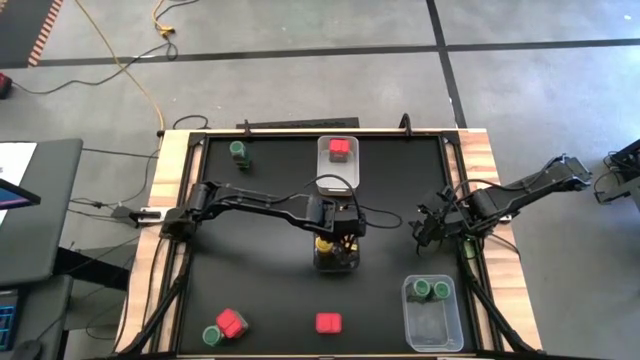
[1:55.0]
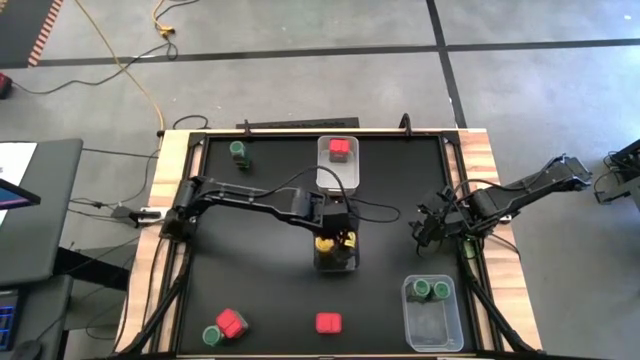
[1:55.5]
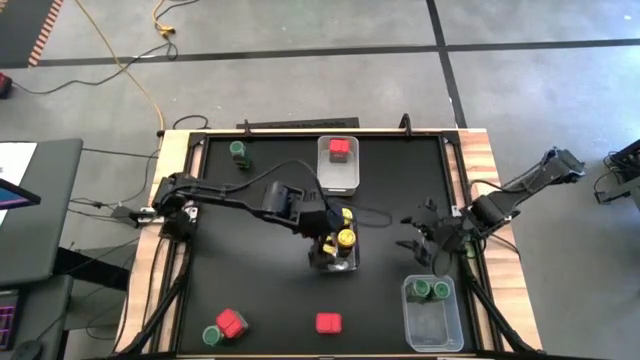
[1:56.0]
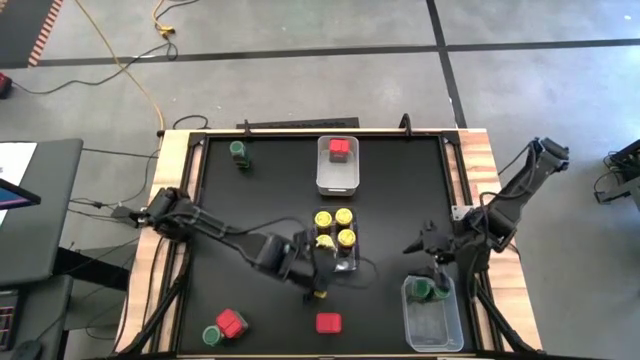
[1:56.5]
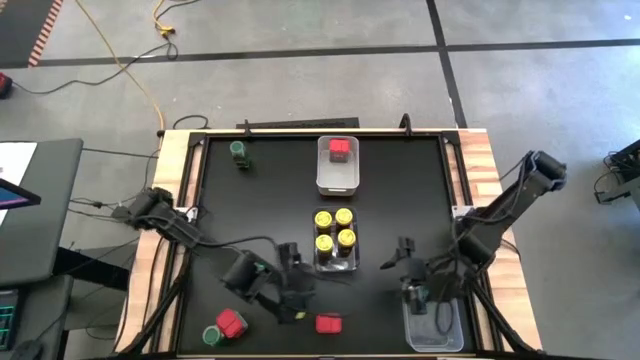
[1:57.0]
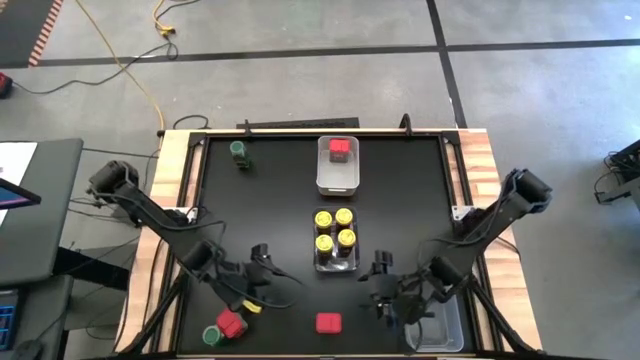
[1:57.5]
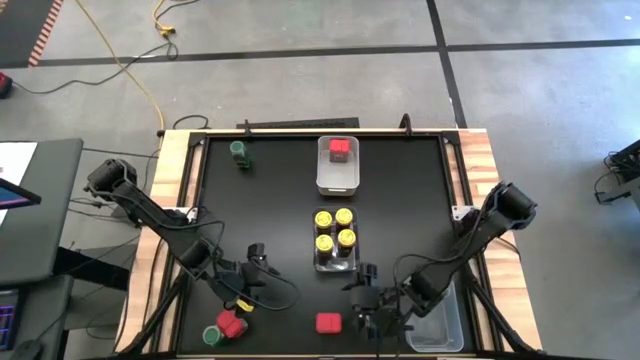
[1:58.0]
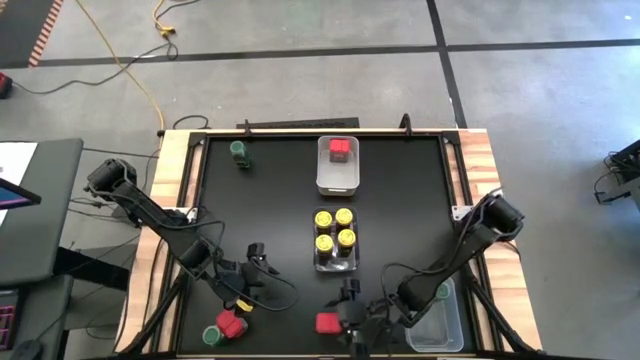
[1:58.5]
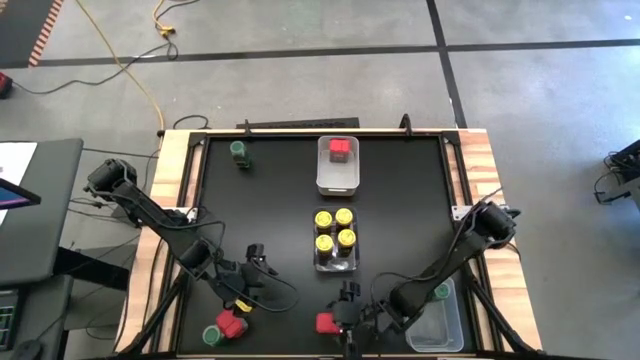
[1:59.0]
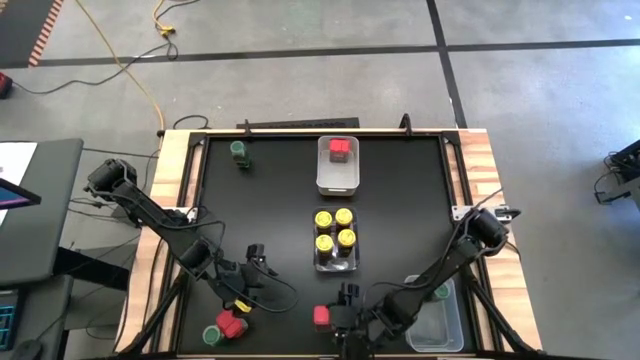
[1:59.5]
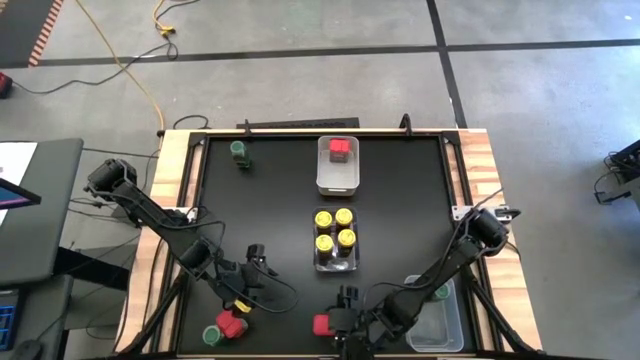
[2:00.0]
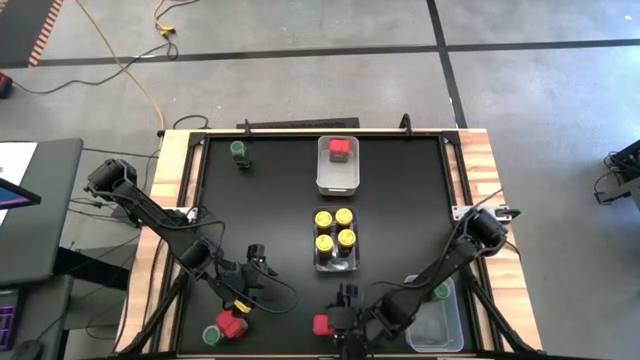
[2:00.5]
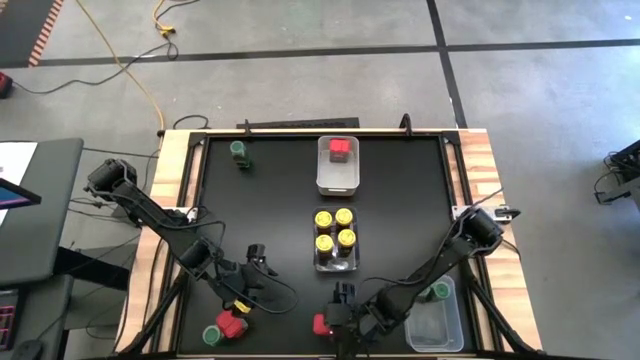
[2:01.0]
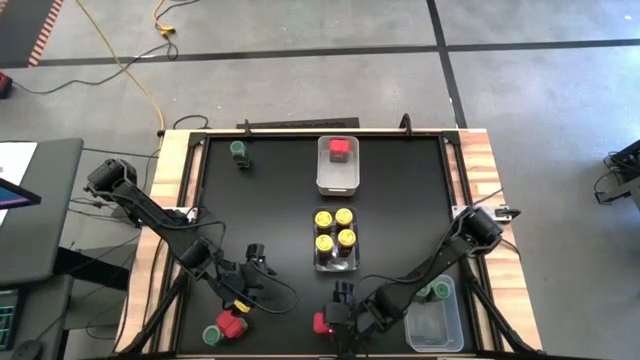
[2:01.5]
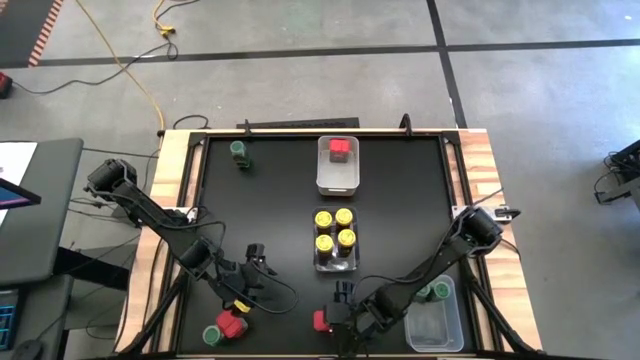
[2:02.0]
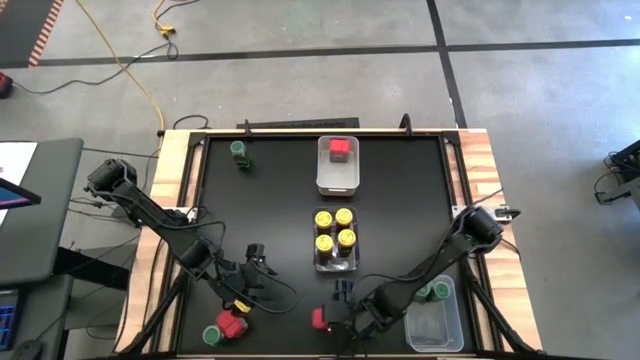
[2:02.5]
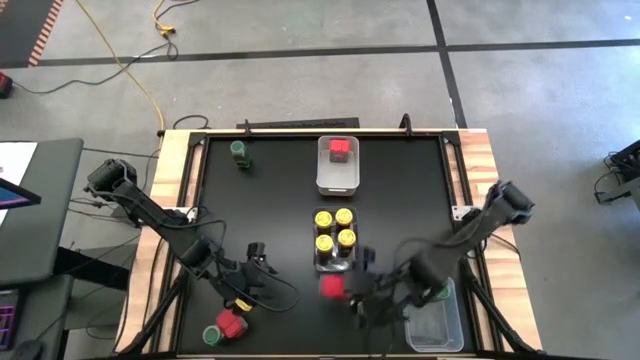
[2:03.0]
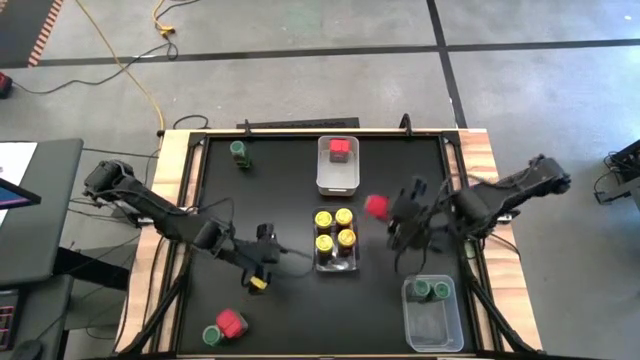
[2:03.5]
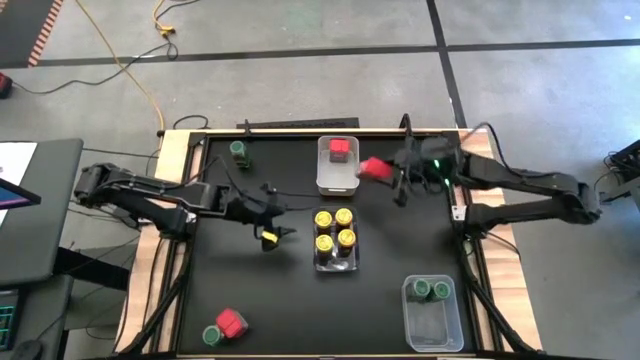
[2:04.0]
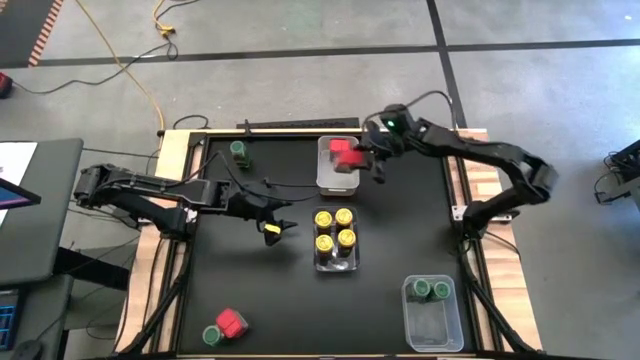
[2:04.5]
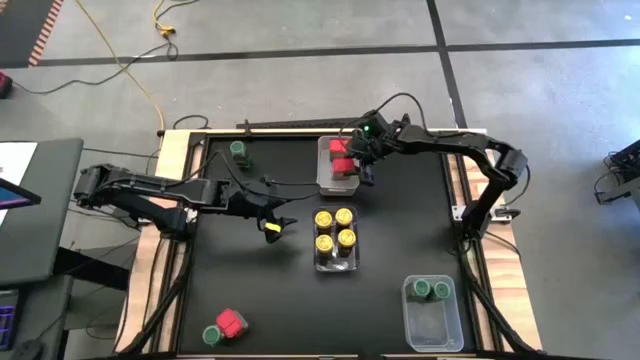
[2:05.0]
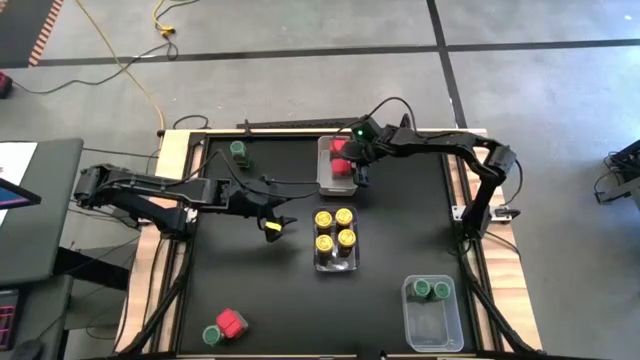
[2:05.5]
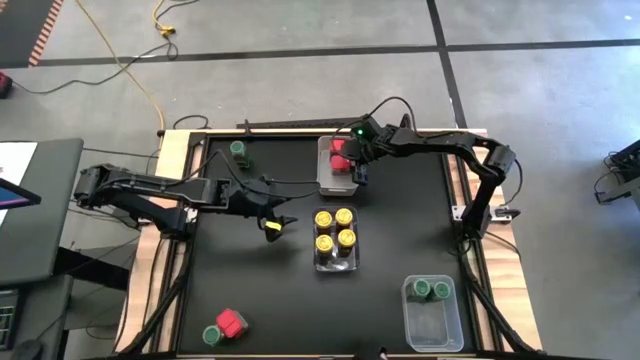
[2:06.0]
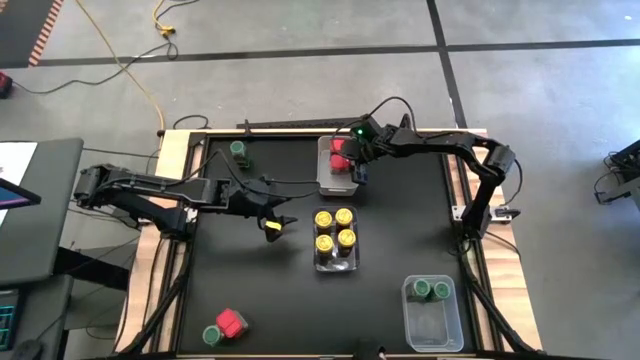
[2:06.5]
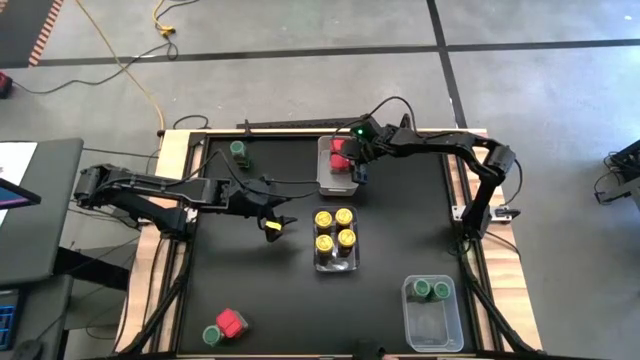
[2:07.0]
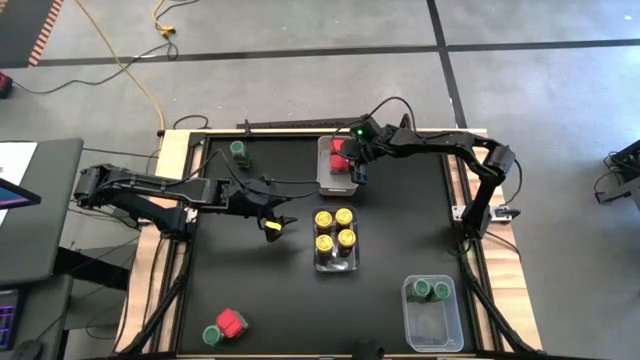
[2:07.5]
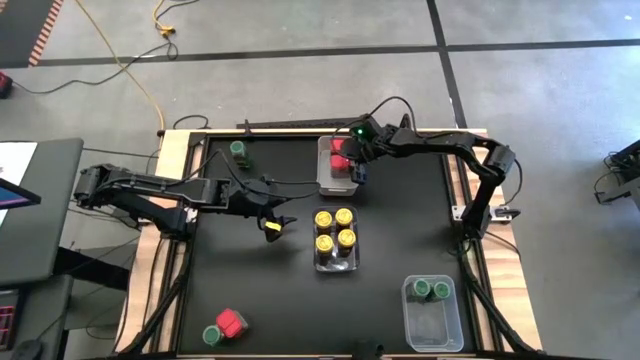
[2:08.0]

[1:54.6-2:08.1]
Task: Sort spices by type
Put the right red seasoning can into the white bin

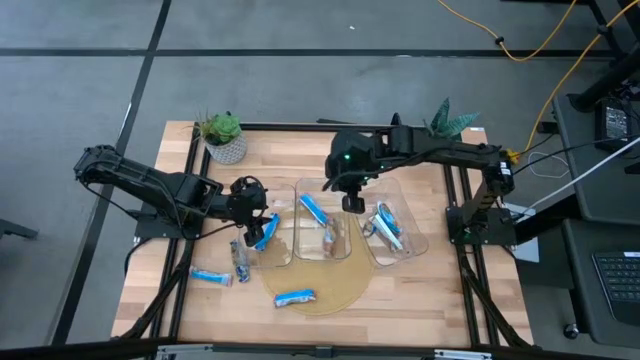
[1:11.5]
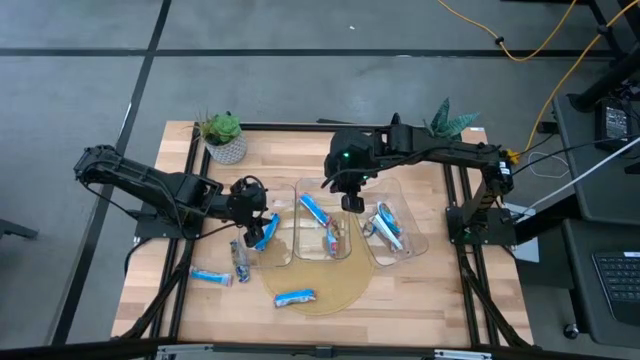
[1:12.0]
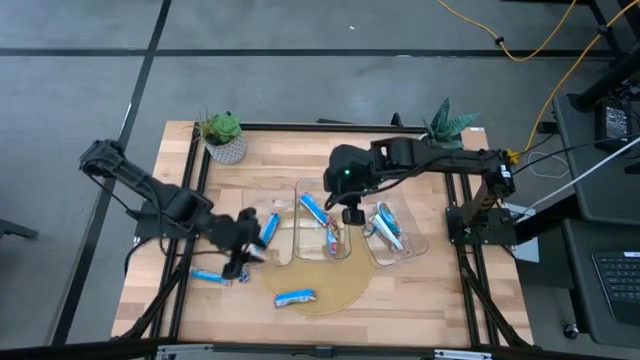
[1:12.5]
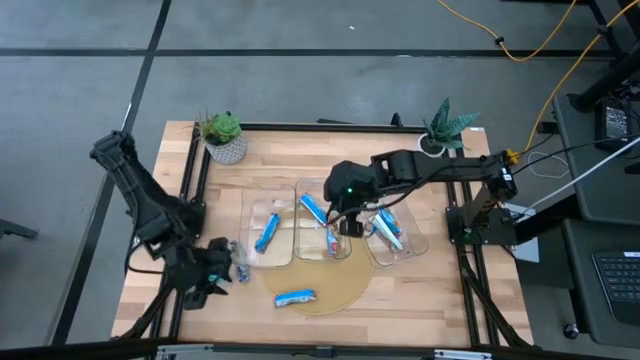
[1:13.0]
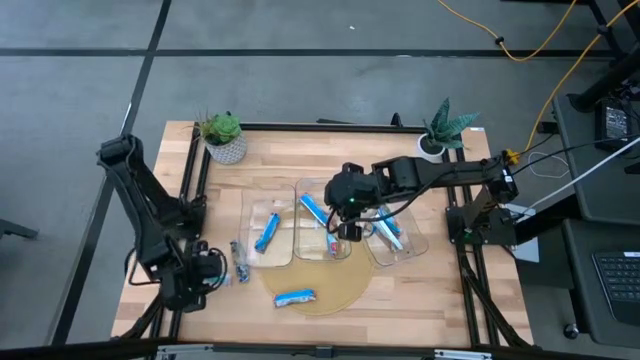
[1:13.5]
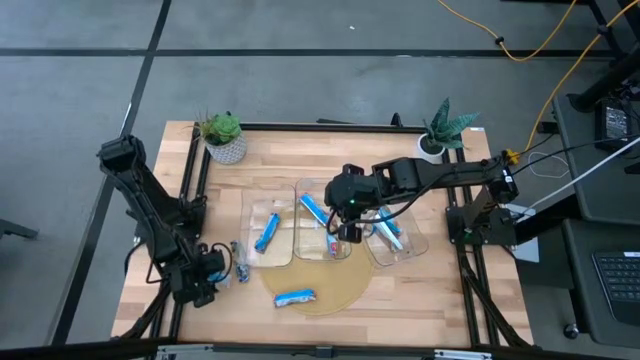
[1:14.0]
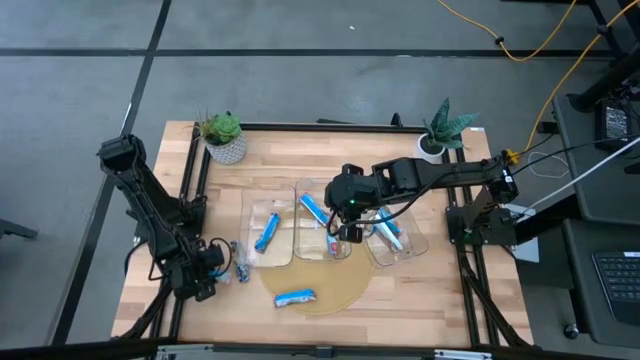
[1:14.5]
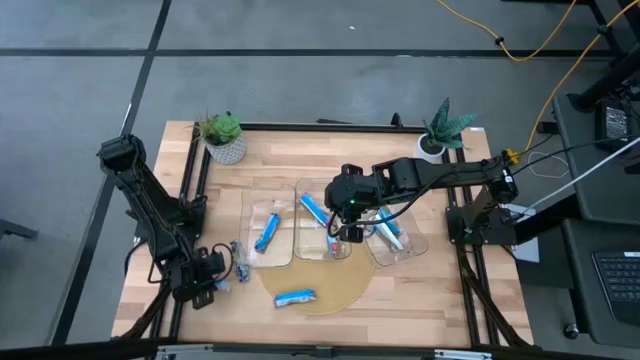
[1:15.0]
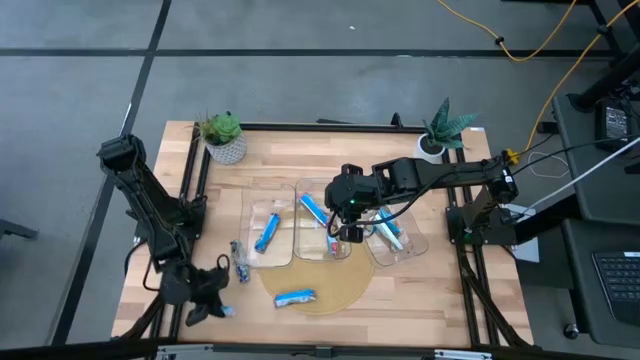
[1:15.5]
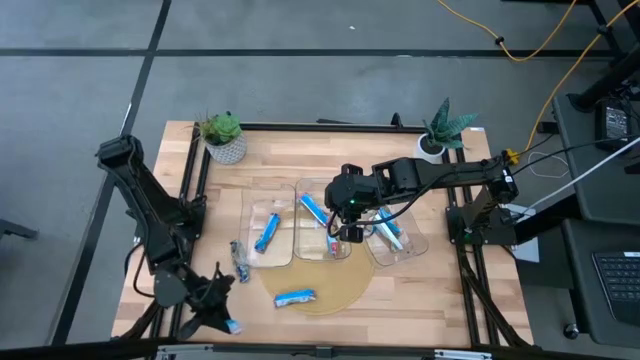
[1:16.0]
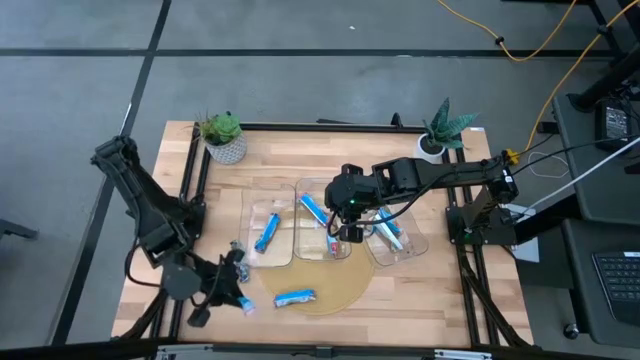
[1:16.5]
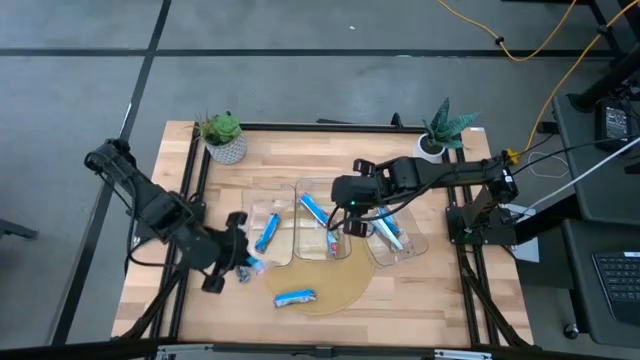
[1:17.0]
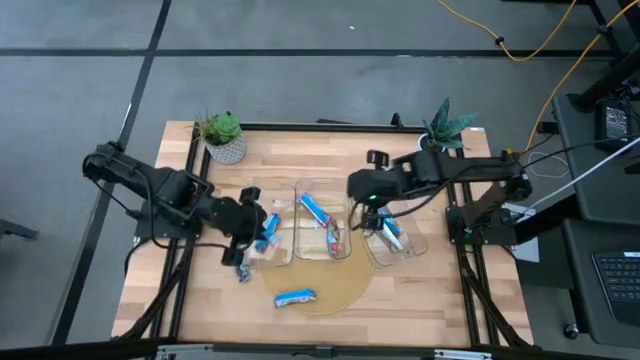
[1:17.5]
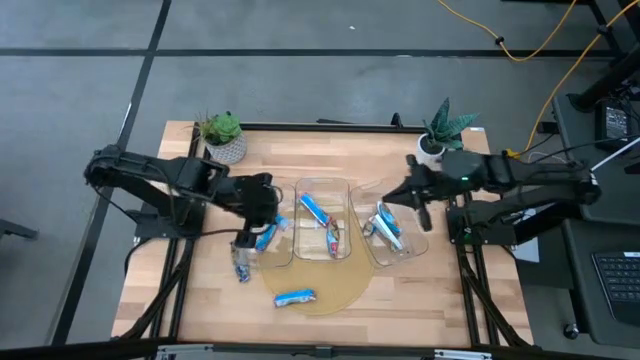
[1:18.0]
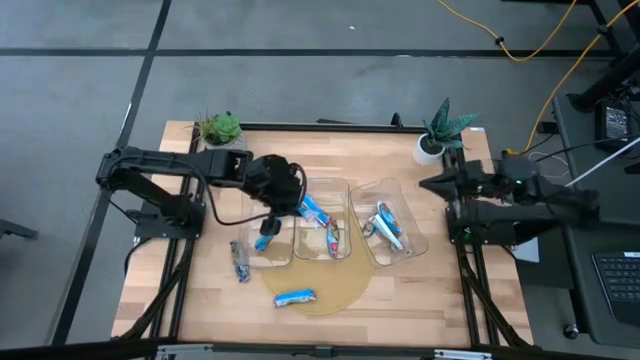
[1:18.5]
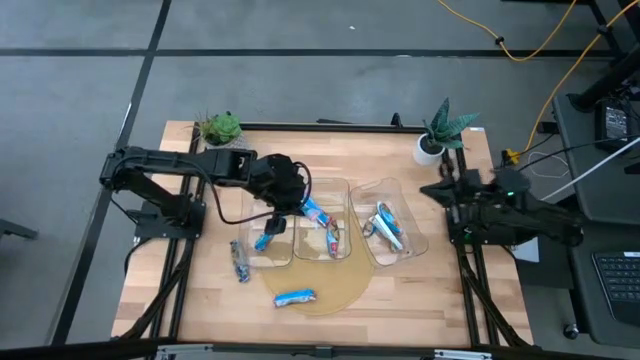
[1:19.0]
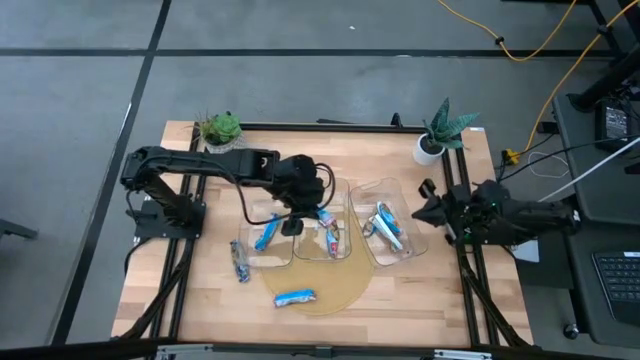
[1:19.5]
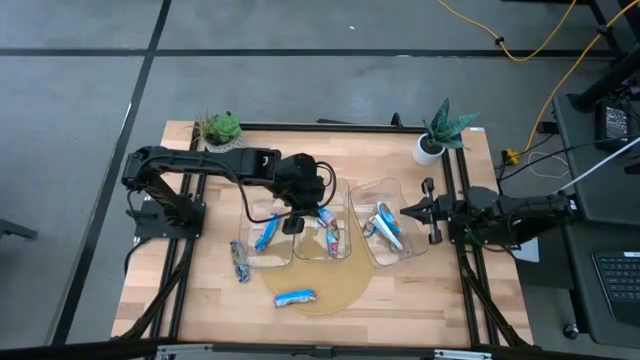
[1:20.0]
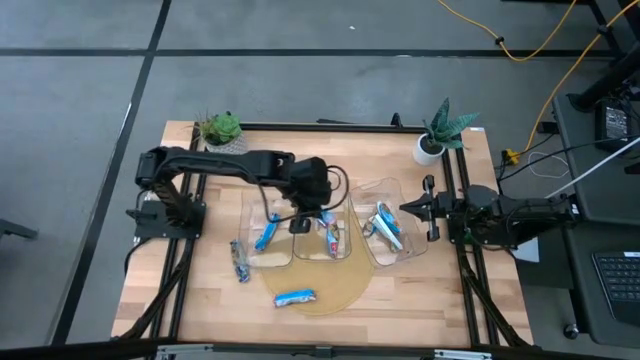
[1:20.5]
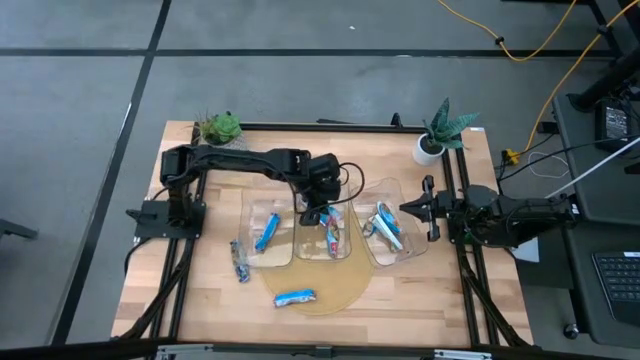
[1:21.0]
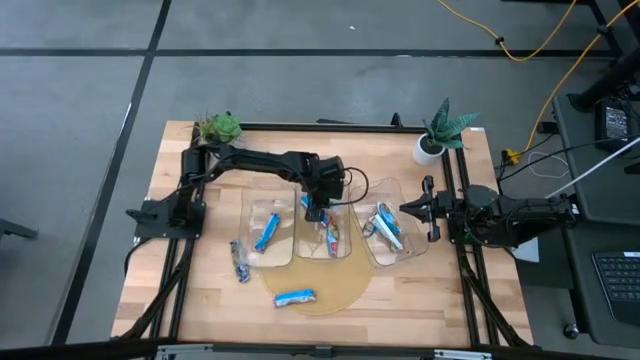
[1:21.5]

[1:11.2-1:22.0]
Task: Pick and place Granola Bars by type
Put the red granola bar into the middle transparent bin
